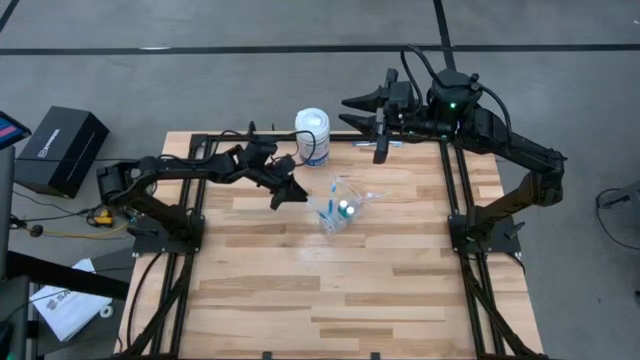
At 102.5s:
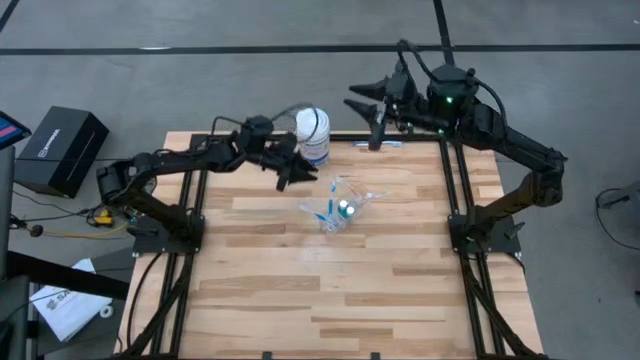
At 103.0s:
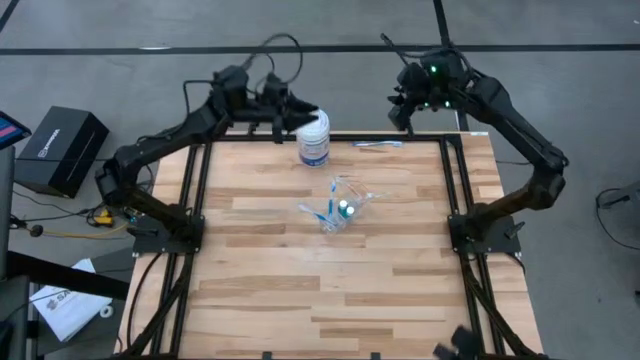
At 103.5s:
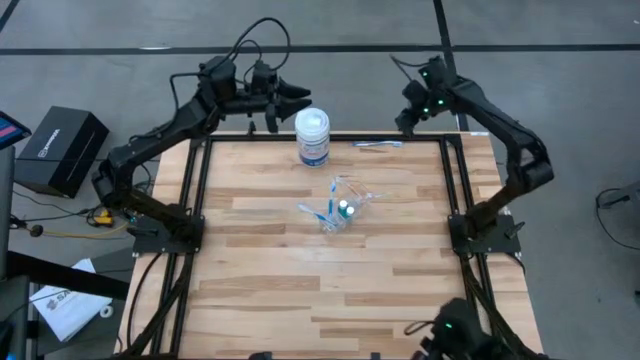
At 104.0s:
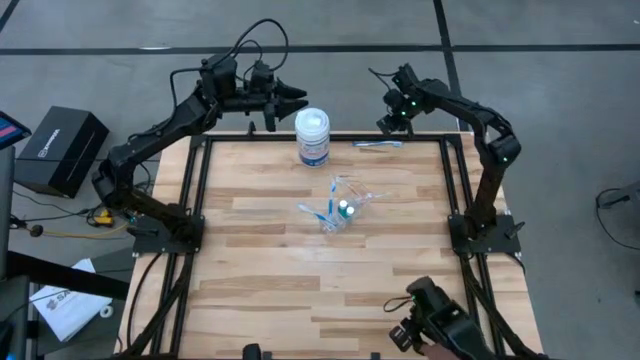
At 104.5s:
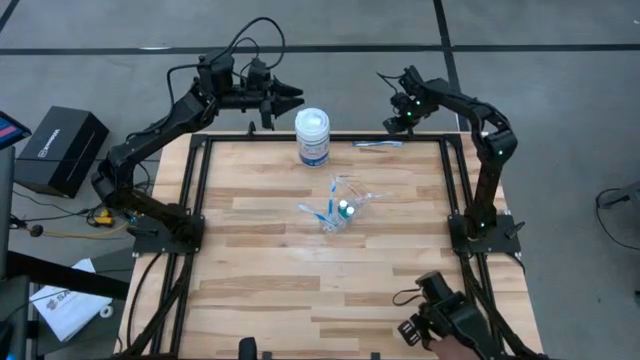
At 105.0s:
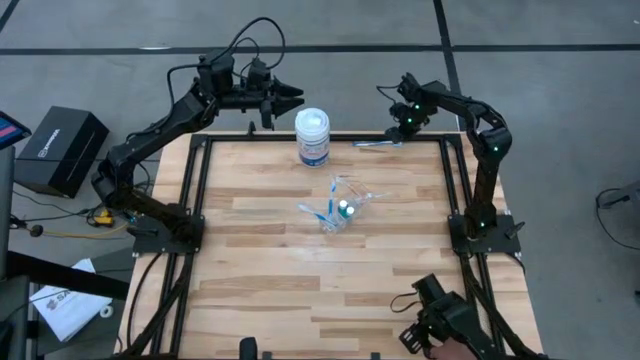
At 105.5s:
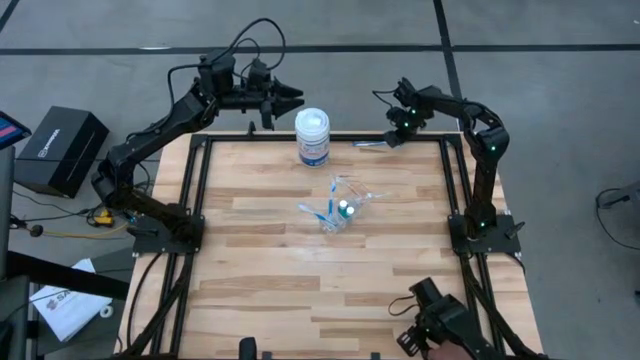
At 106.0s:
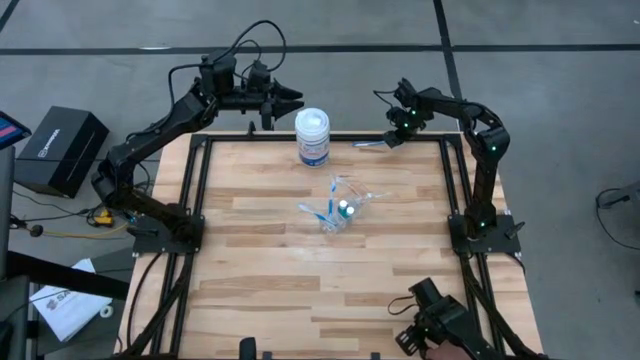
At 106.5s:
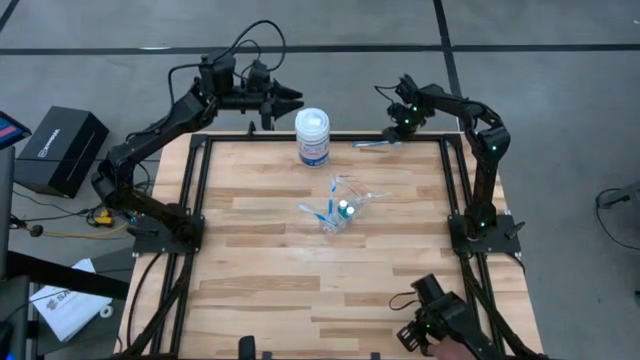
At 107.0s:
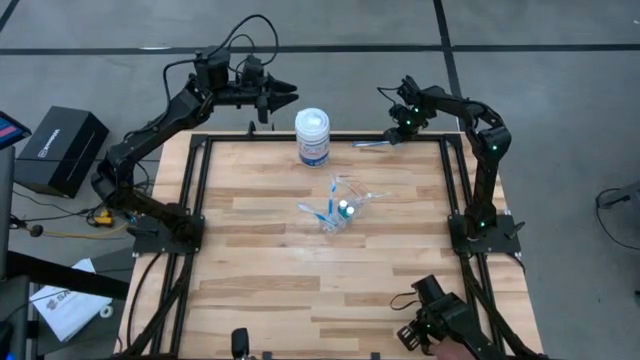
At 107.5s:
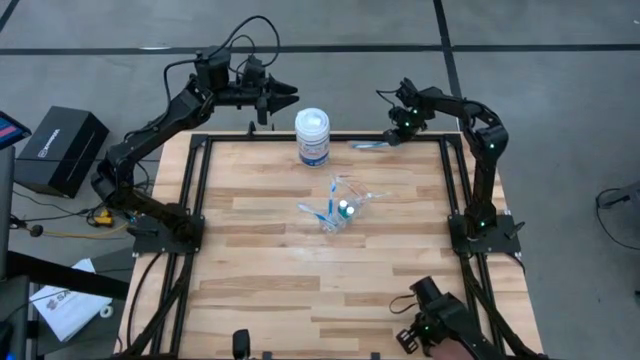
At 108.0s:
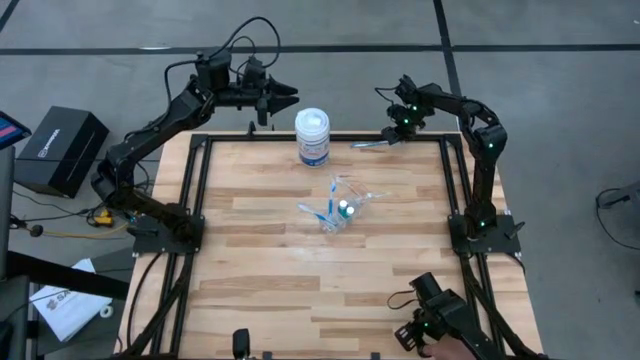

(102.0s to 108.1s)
Task: Pick & Place toothbrushing station
Put the blue toothbrush into the transparent organizer

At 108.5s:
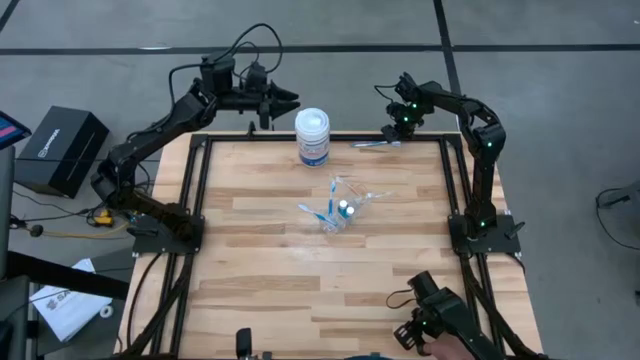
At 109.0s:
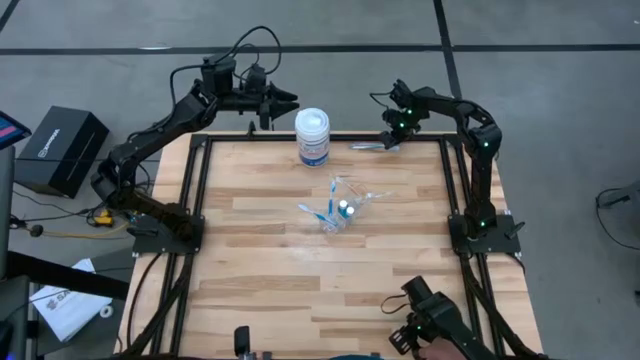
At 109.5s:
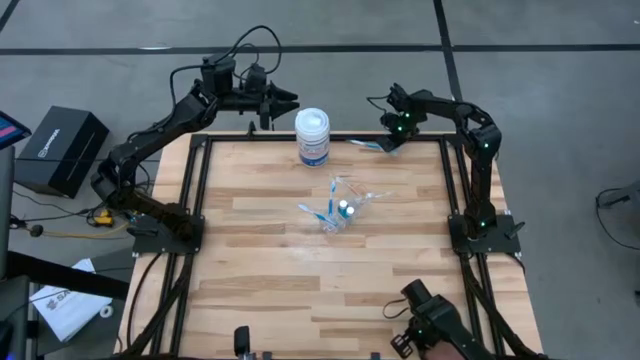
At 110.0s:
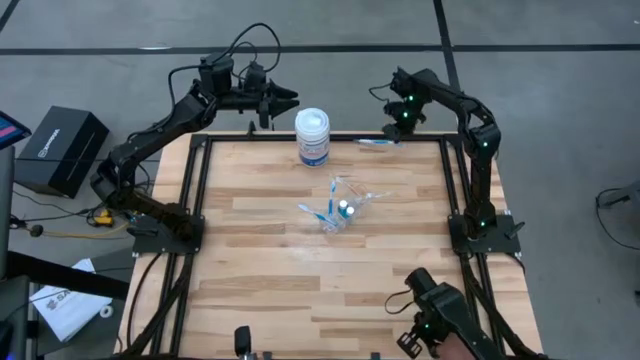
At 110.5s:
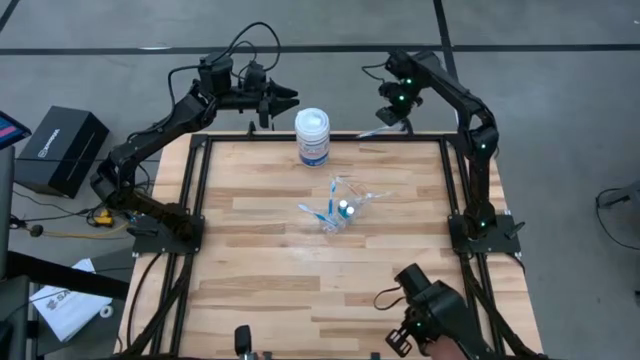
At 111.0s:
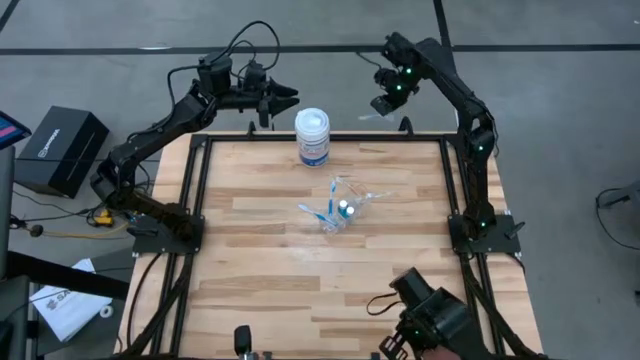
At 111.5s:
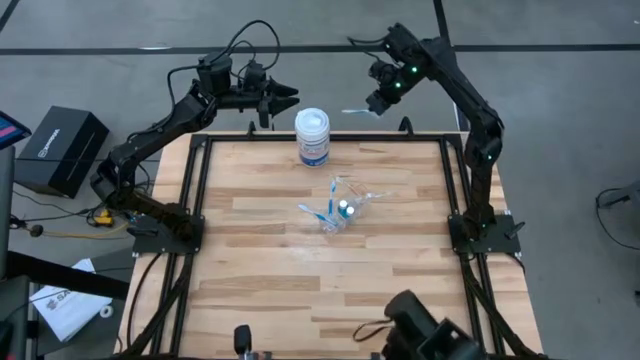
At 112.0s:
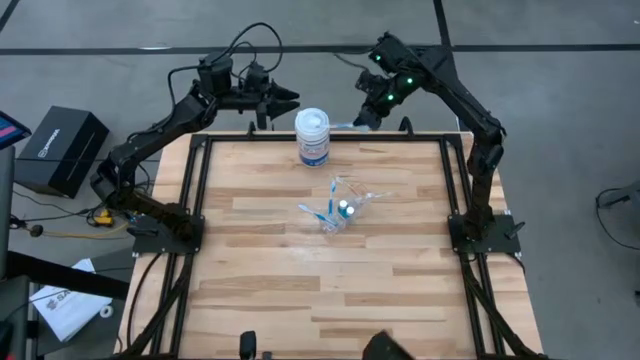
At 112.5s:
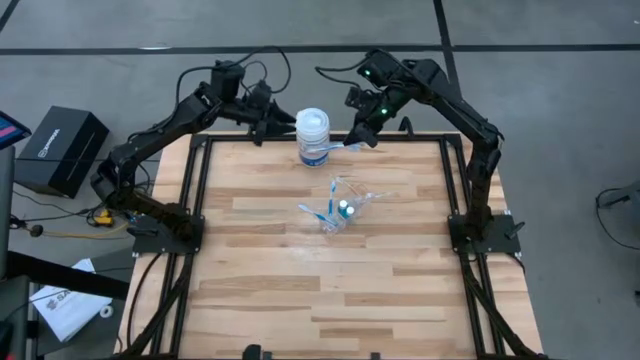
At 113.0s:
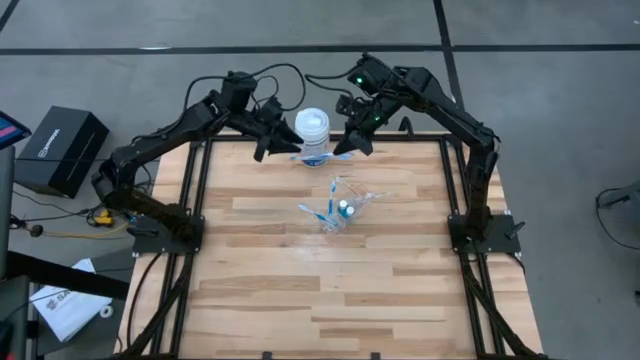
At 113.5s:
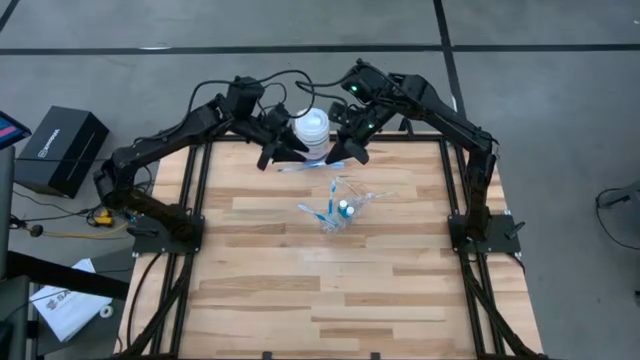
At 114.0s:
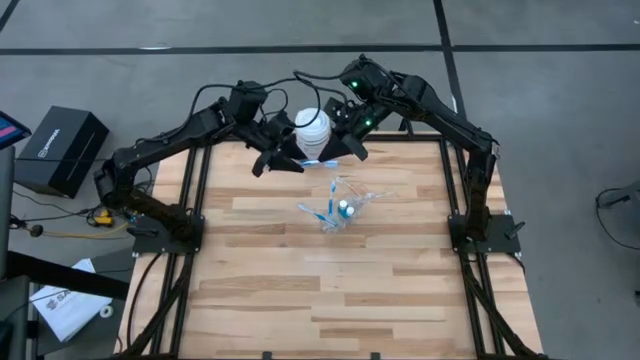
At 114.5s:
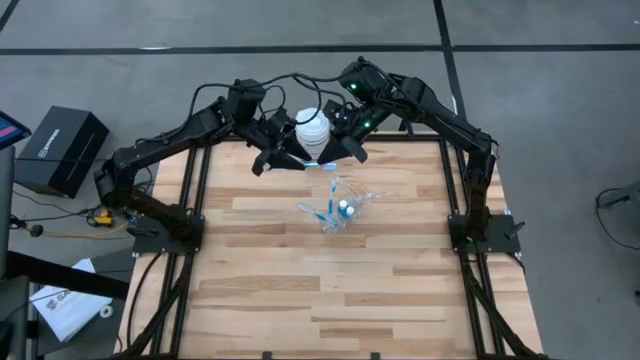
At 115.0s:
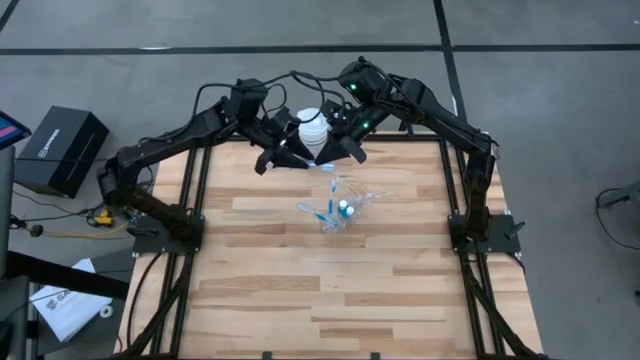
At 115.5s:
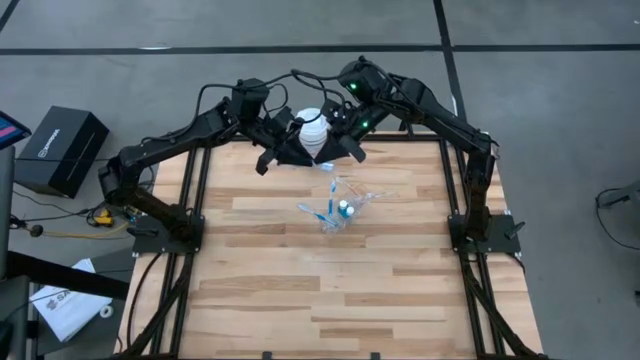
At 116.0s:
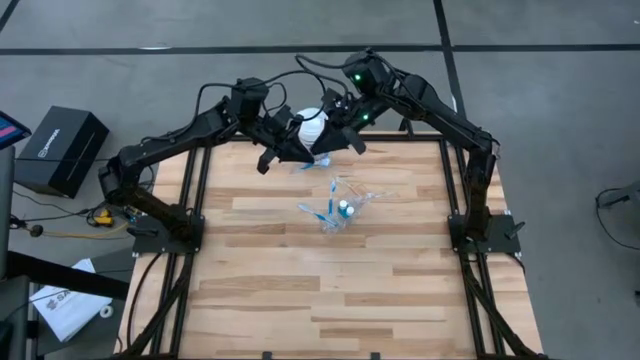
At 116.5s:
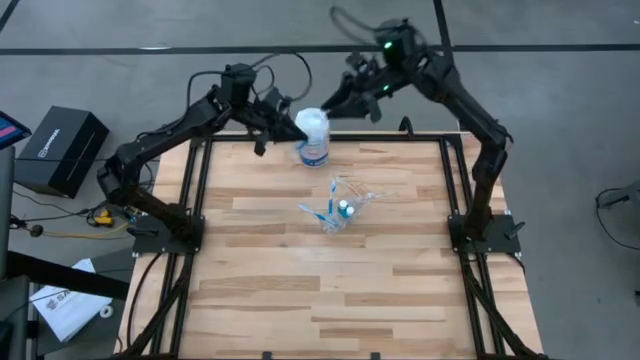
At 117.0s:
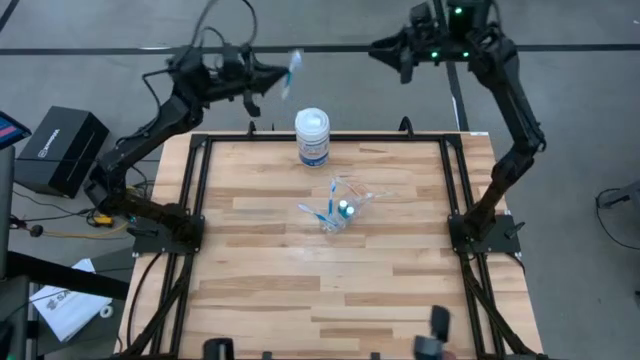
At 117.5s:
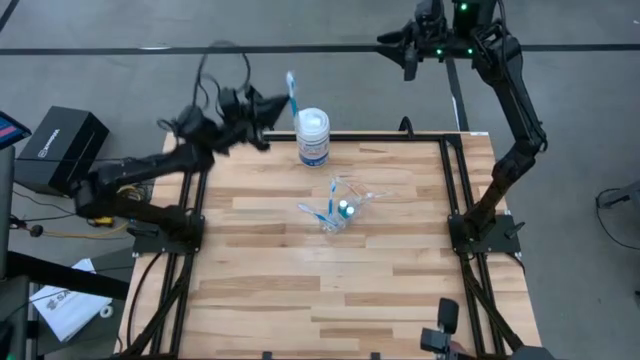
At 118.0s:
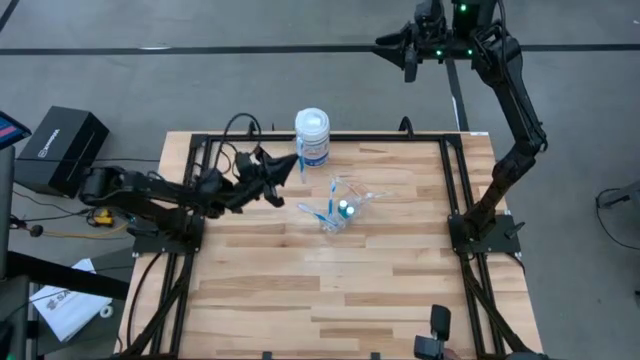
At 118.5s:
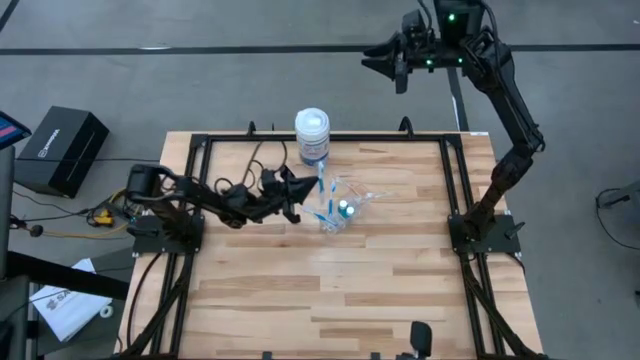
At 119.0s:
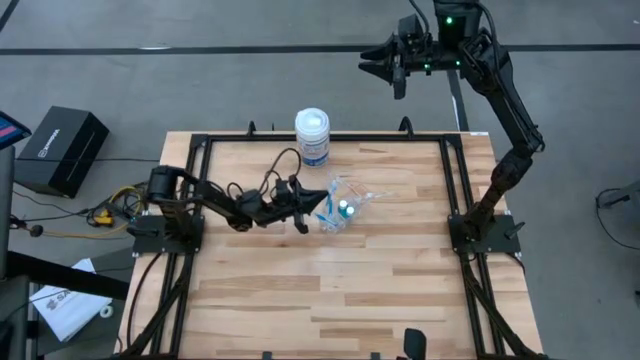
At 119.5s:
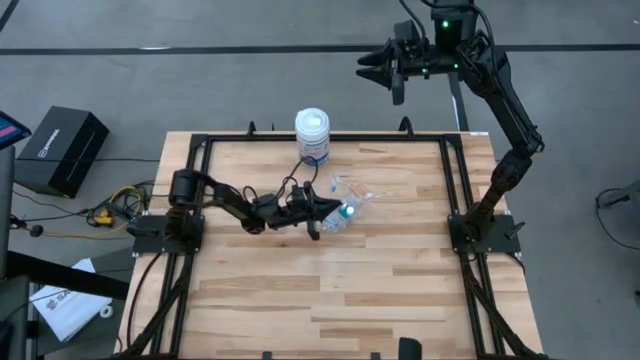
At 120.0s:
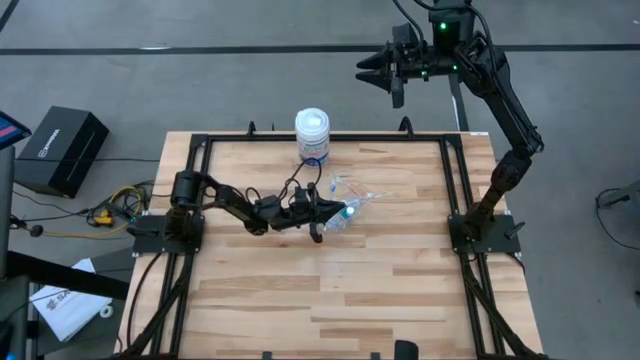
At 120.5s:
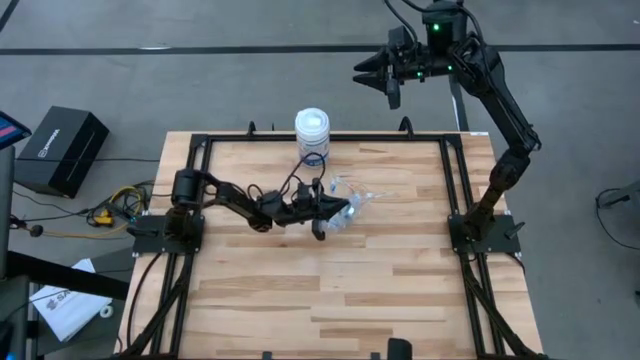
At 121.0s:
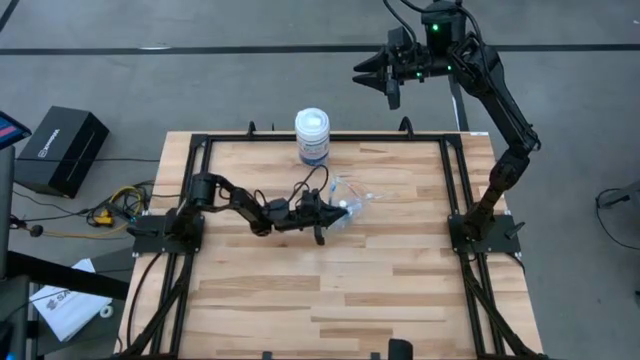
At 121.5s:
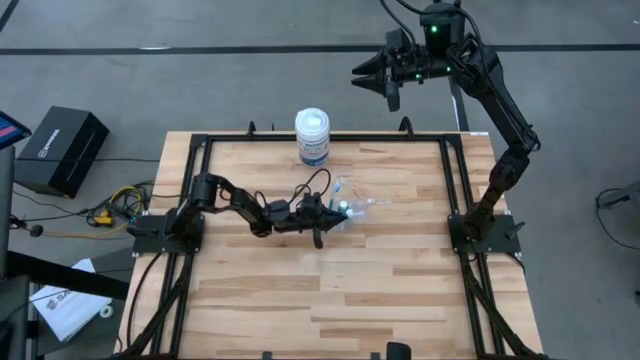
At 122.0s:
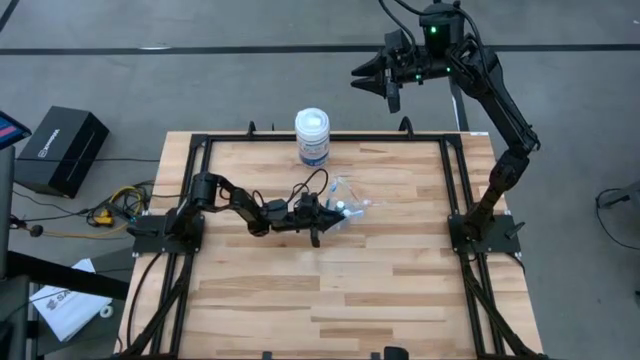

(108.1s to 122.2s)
Put the blue toothbrush into the transparent organizer

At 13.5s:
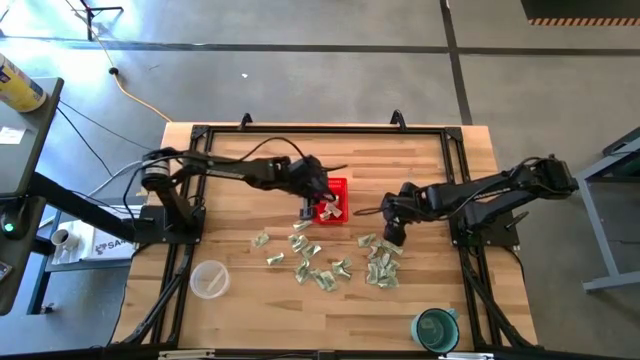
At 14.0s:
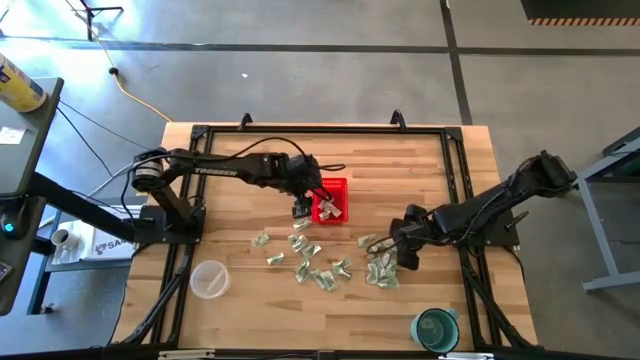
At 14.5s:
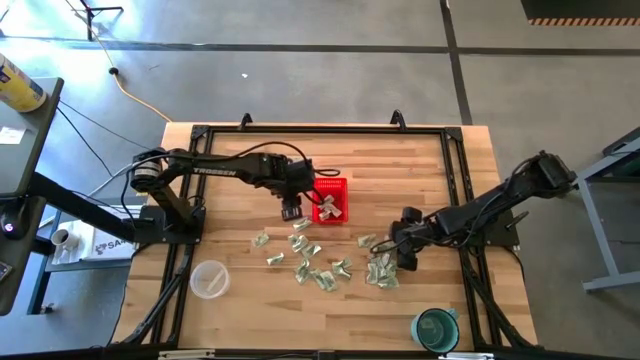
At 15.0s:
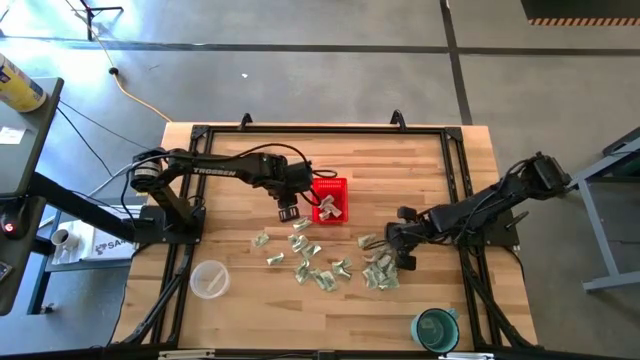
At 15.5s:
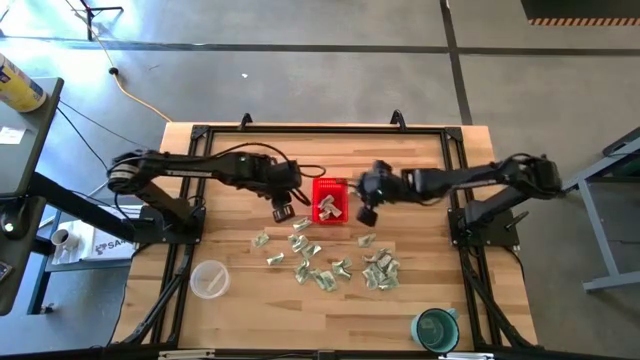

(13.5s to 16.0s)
Task: Pick and place items into bin
Put the light green stevia packet into the red bin
